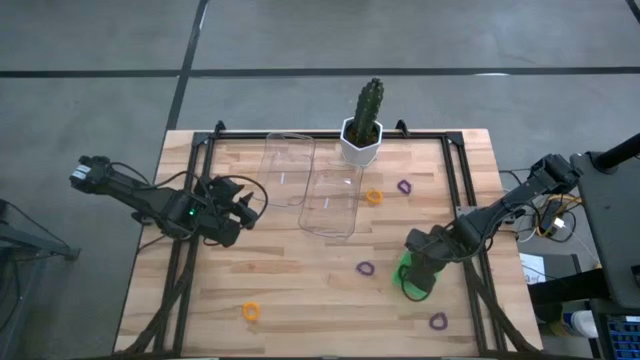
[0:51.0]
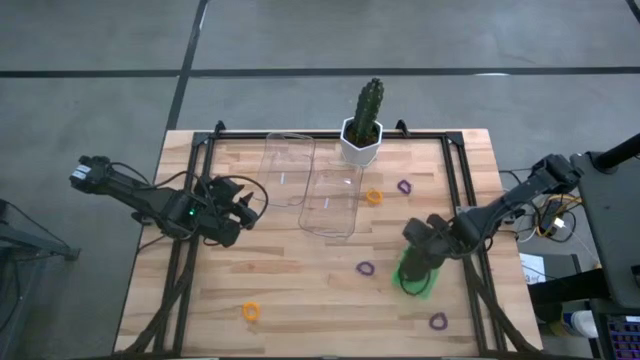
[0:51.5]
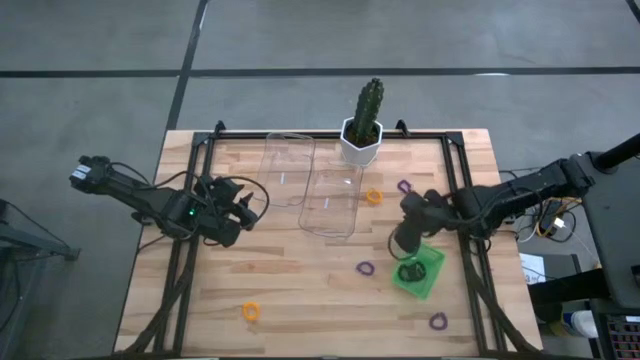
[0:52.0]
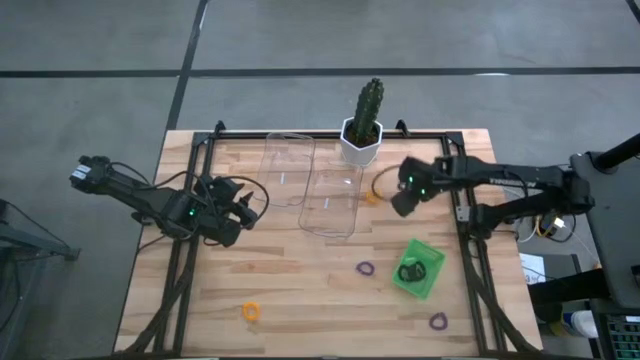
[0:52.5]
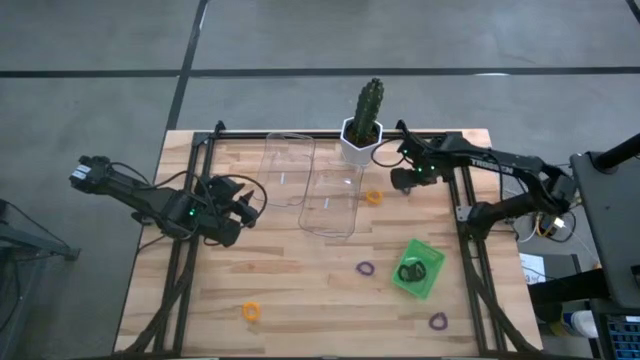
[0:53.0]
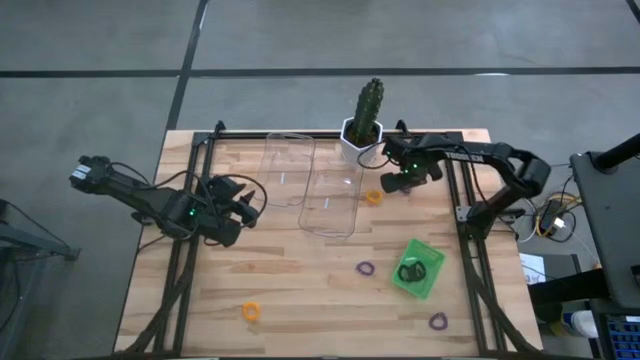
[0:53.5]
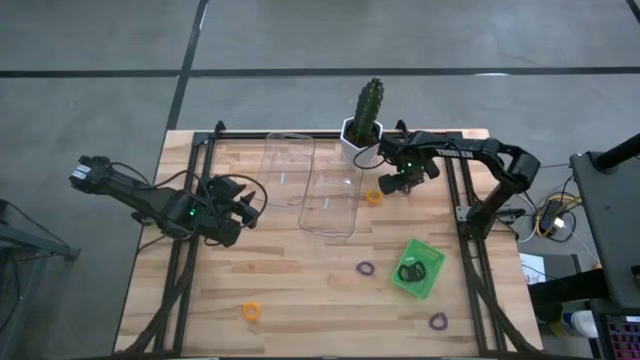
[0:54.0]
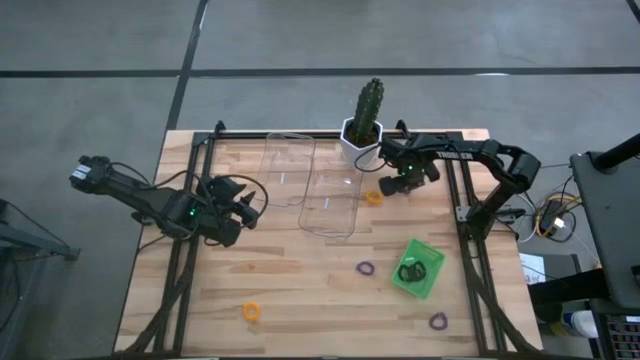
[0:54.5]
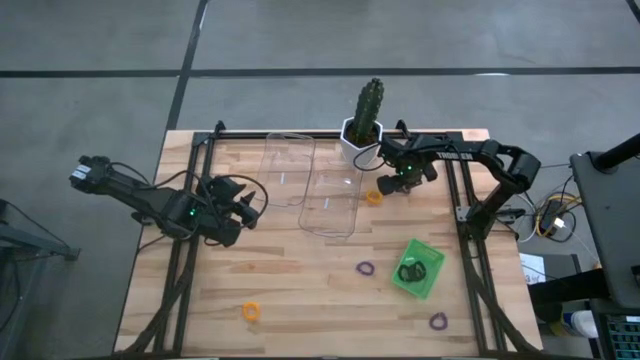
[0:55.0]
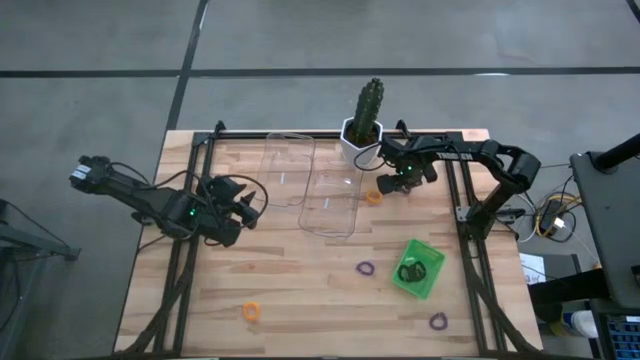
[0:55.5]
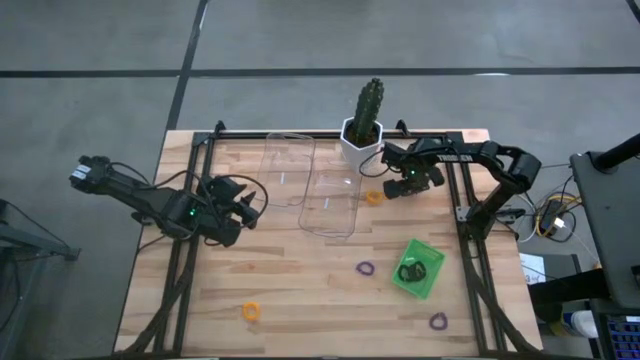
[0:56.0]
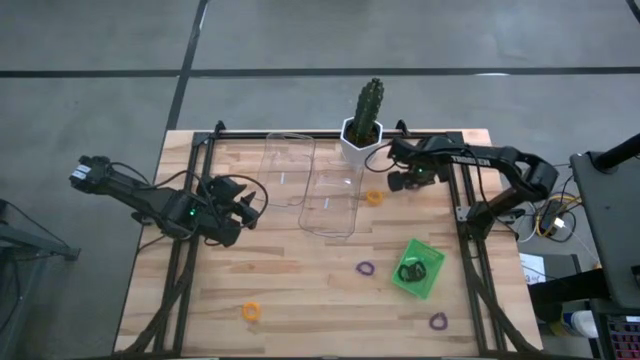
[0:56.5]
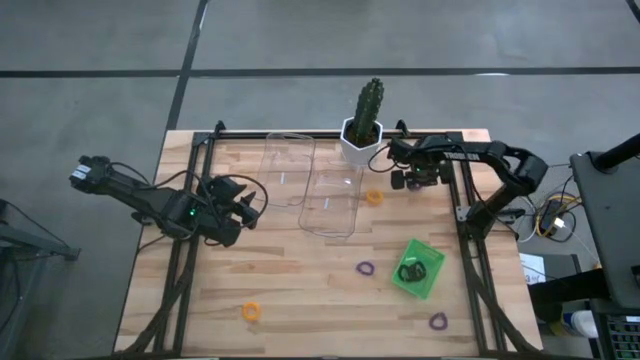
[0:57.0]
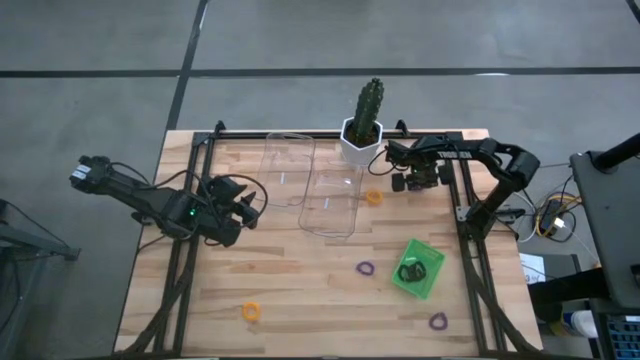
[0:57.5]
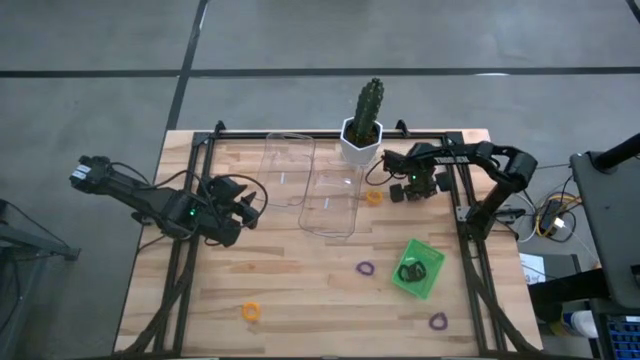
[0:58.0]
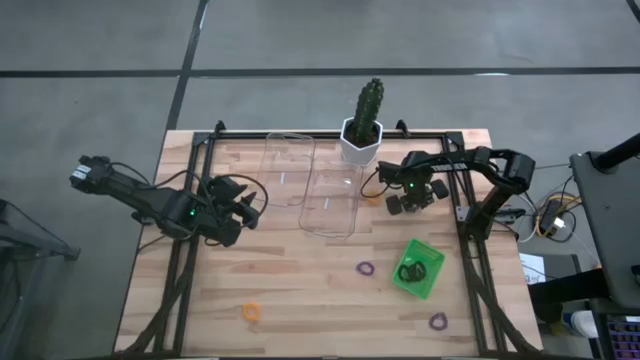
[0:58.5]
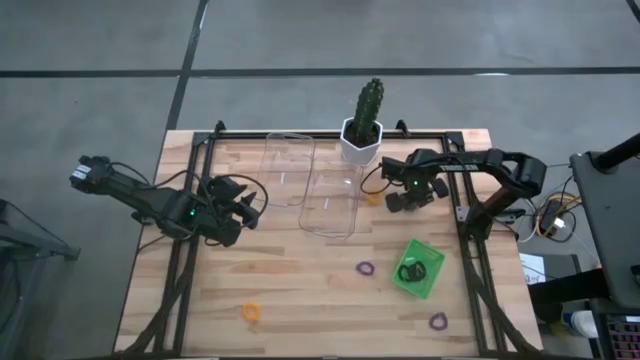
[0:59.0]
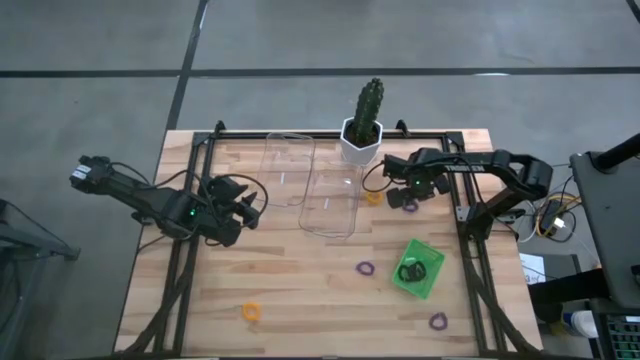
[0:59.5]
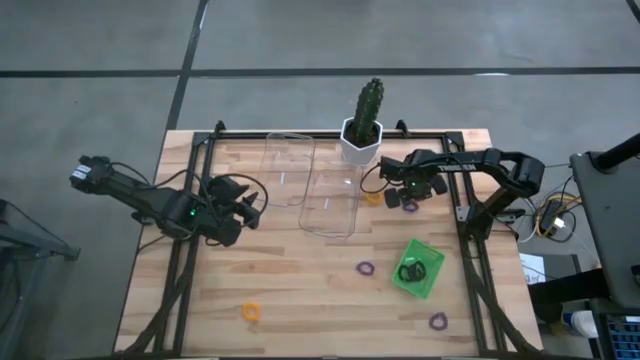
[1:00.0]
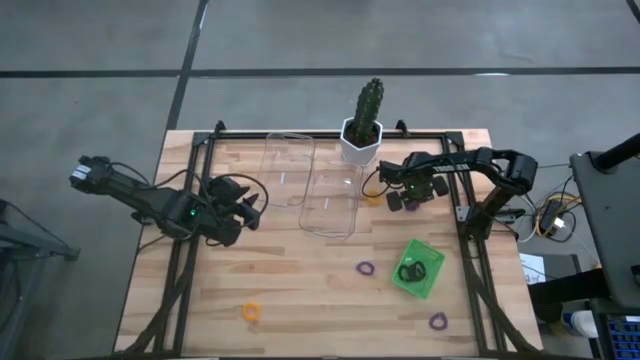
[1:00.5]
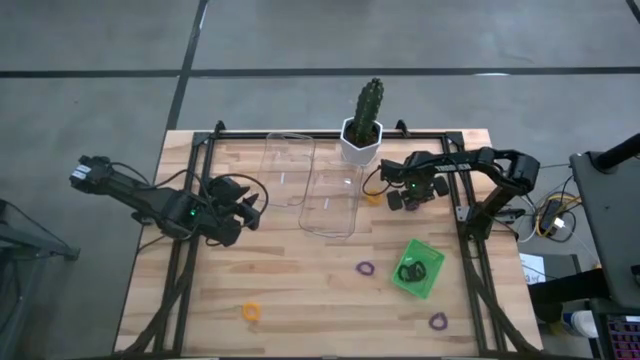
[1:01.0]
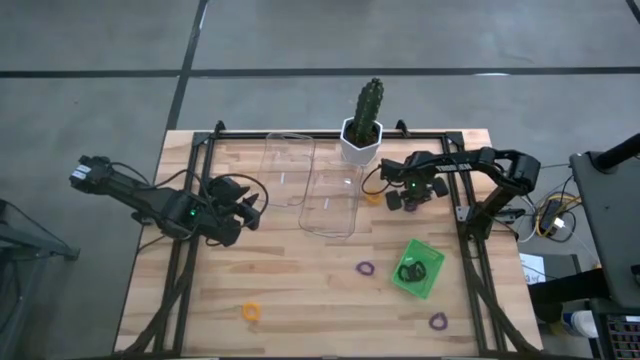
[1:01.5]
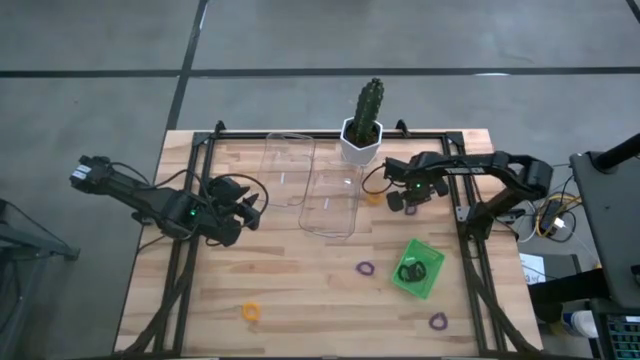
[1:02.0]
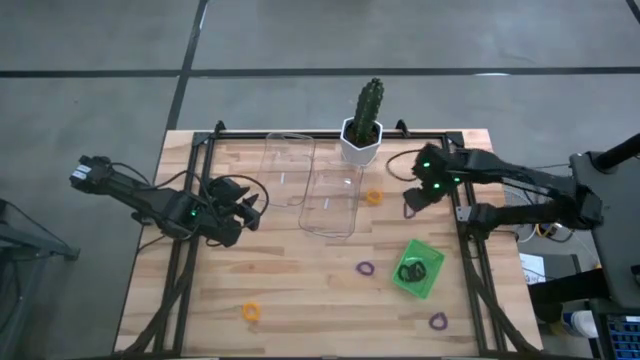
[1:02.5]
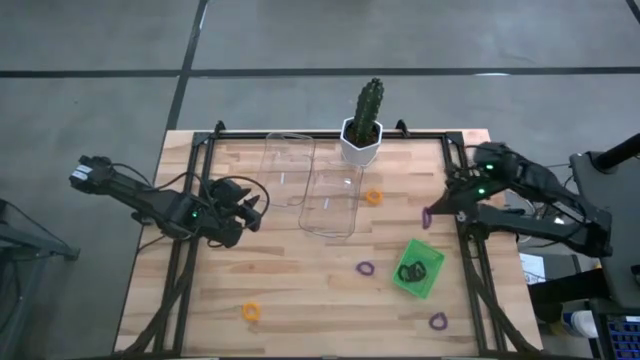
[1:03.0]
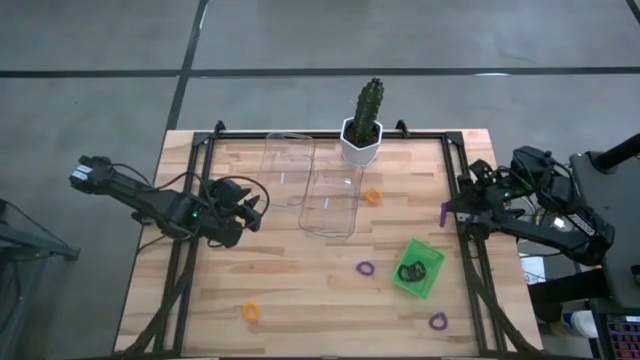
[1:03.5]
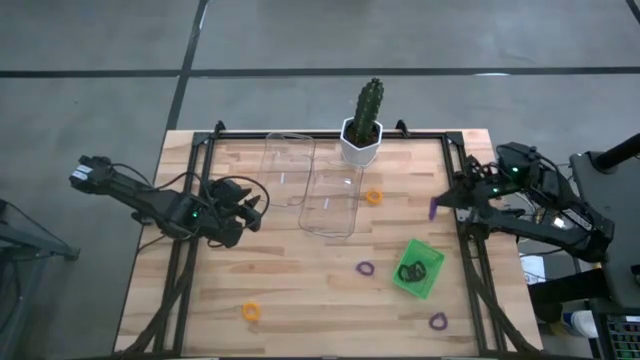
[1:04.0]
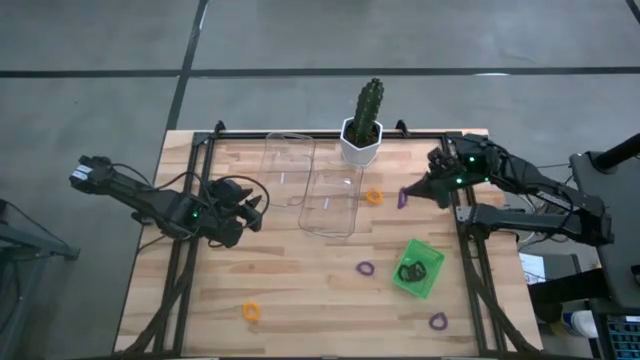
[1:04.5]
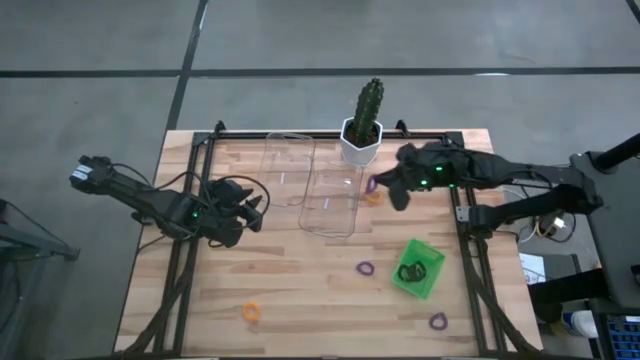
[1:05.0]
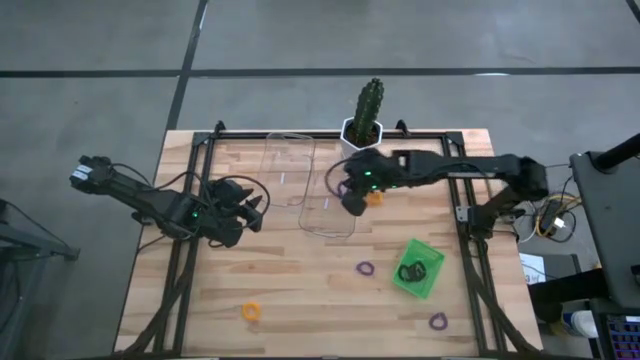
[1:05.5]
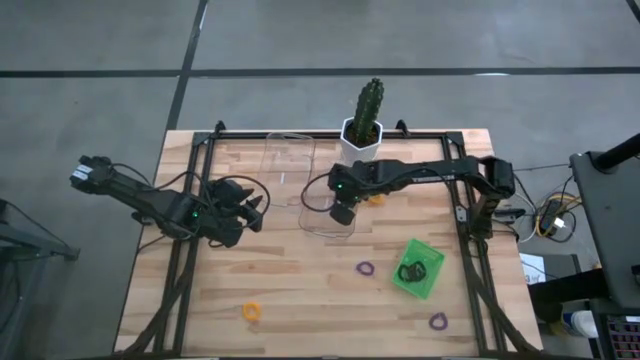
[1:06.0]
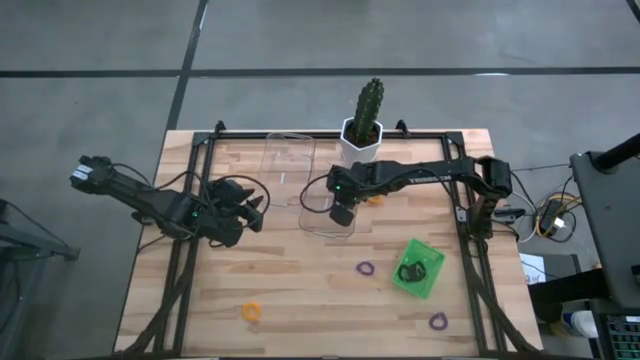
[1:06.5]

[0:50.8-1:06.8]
Task: Sort spring keychains
Put the top violet spring keychain into the right transparent bin

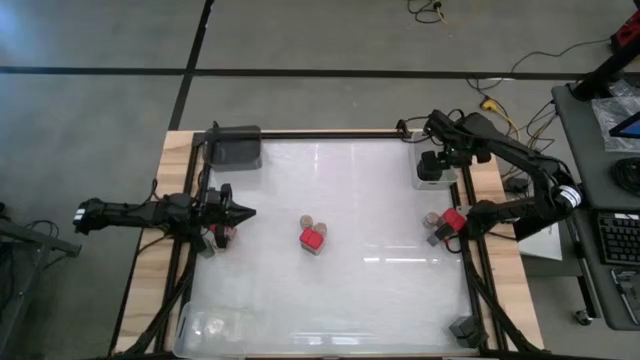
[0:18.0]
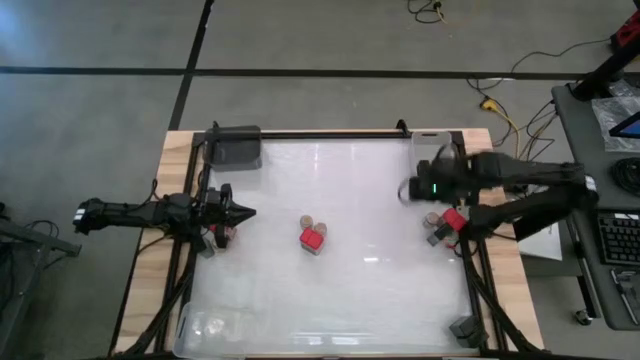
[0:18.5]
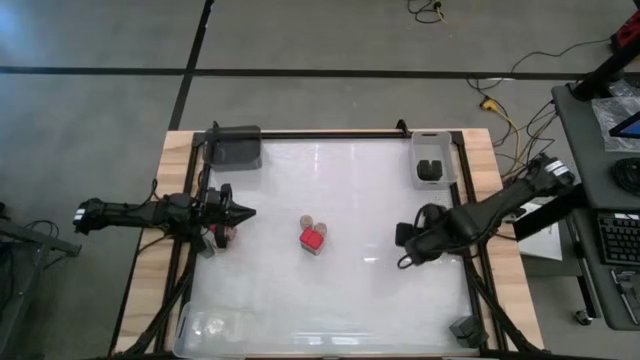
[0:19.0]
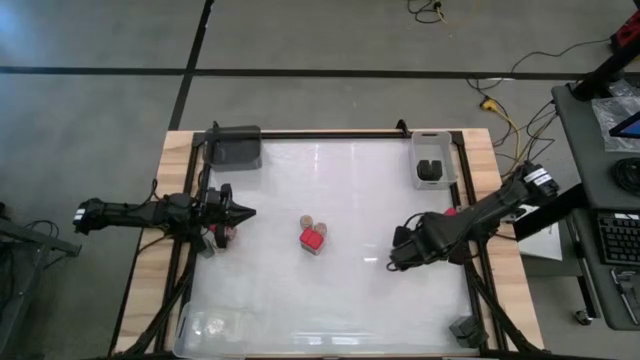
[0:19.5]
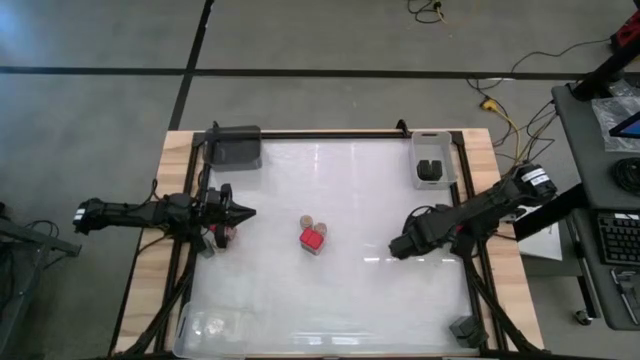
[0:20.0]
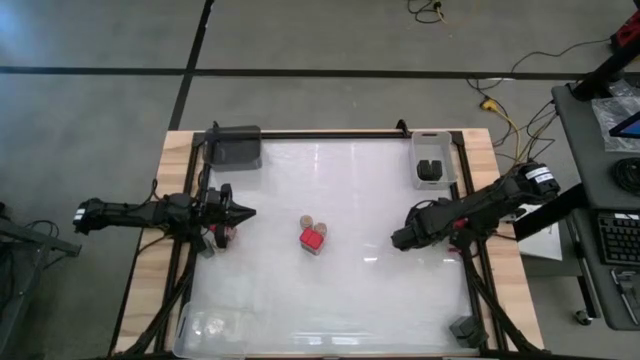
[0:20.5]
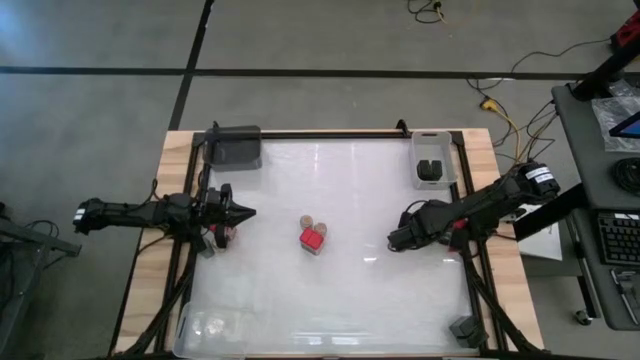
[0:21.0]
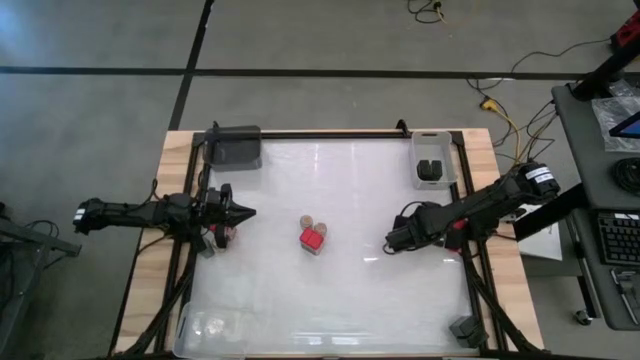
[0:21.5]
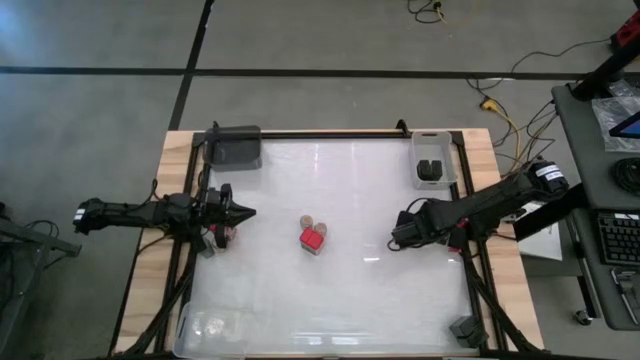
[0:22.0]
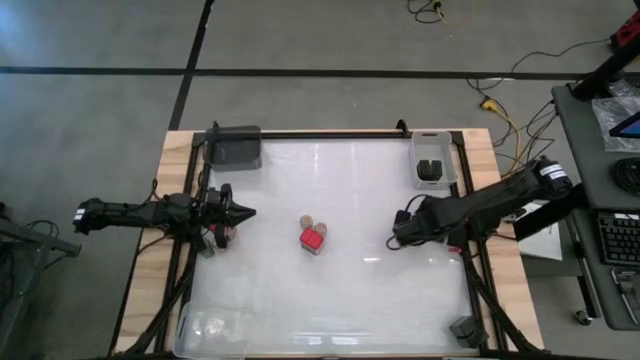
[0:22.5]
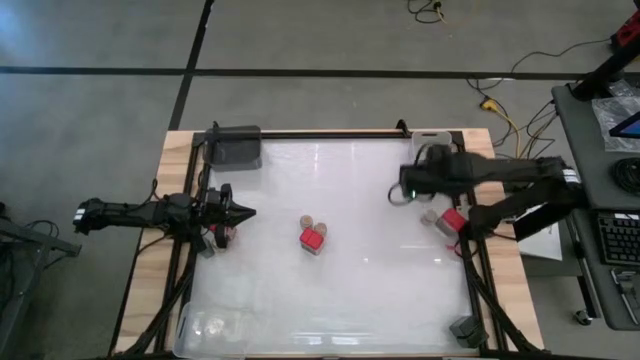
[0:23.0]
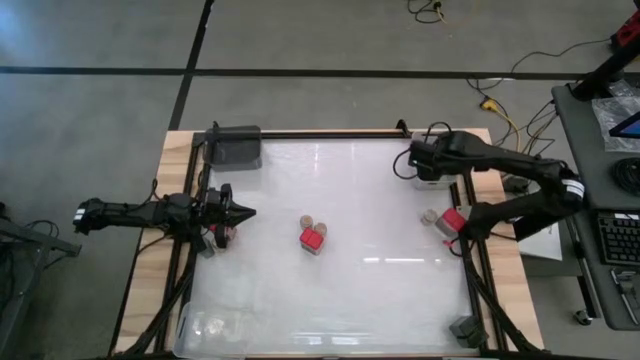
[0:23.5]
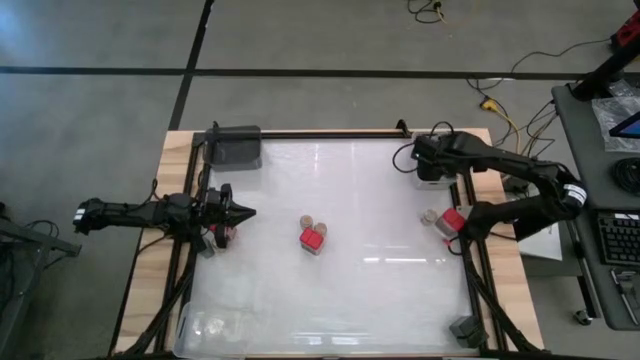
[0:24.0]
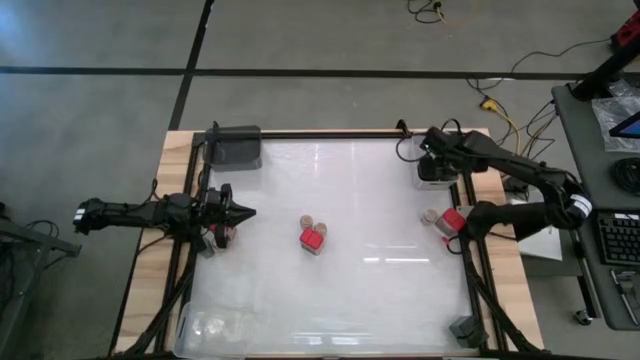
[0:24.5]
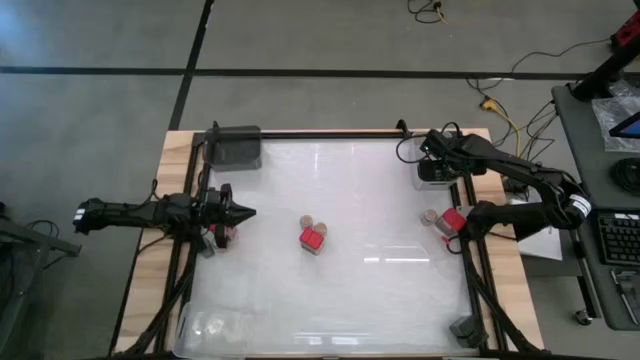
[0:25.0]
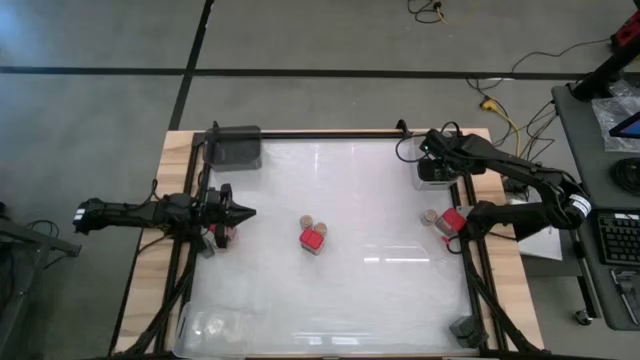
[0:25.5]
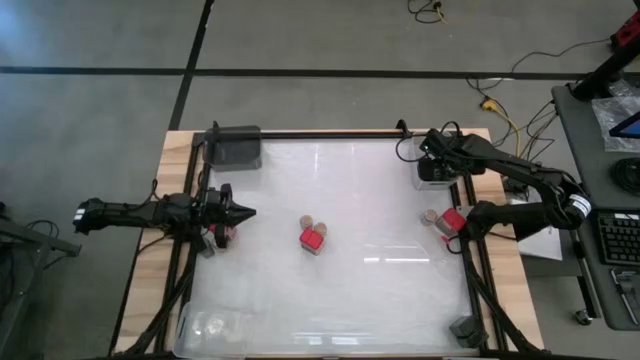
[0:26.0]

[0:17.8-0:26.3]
Task: Sort spices by type
Put the black seasoning can into the gray bin
